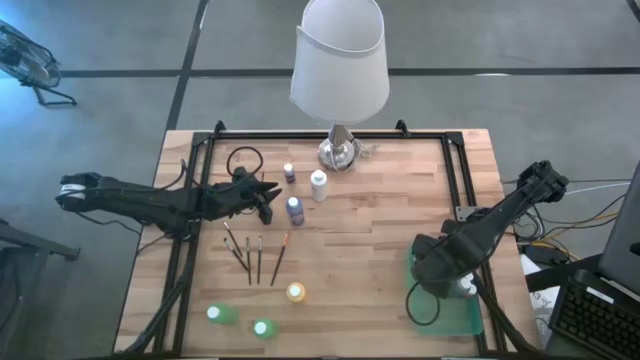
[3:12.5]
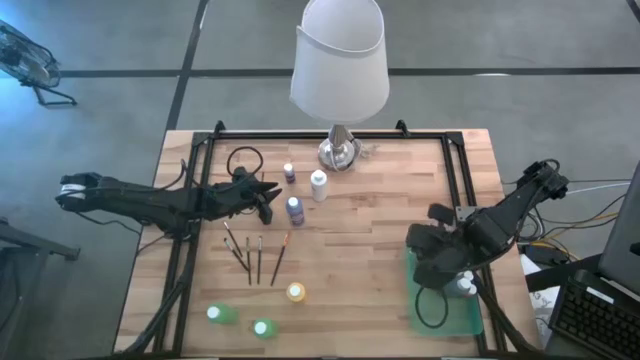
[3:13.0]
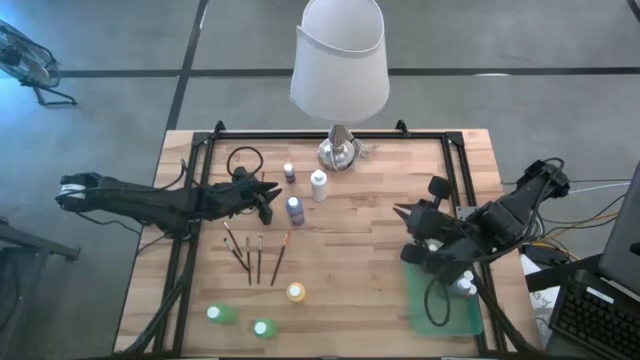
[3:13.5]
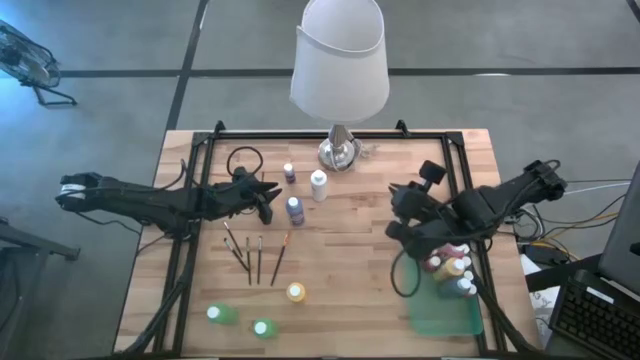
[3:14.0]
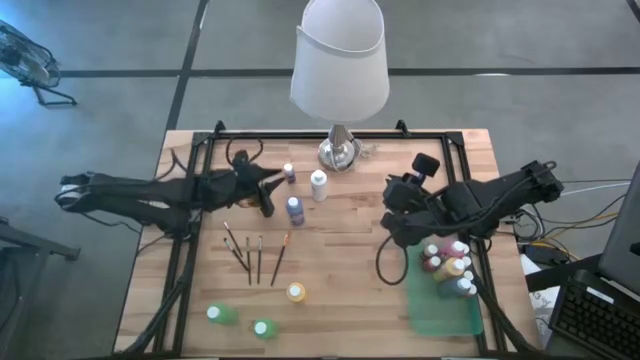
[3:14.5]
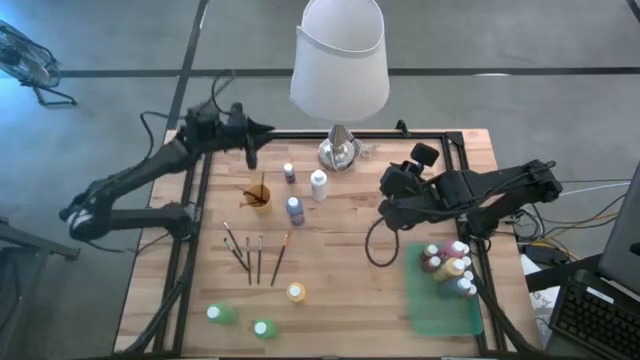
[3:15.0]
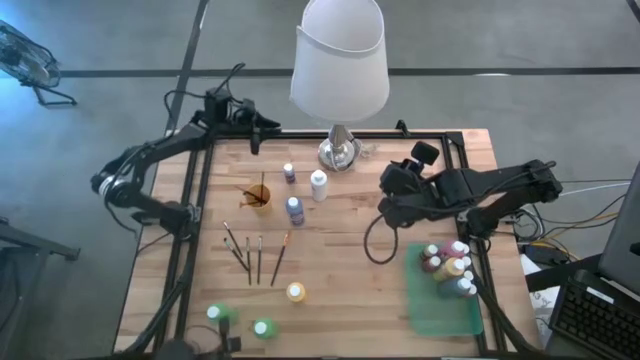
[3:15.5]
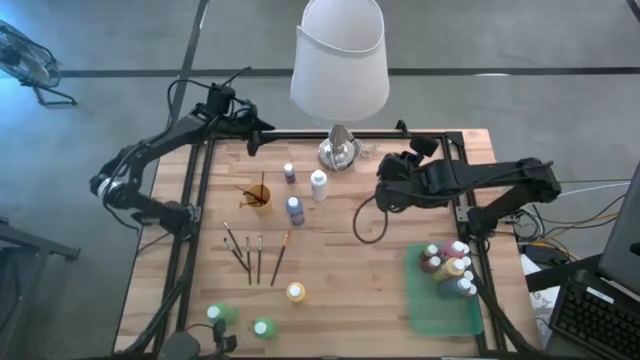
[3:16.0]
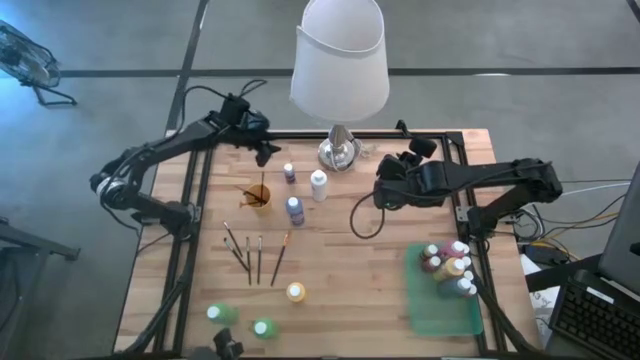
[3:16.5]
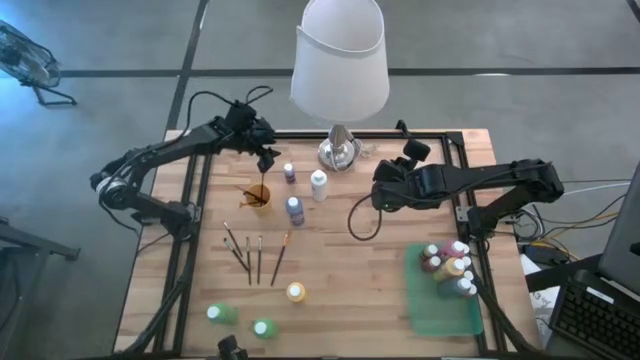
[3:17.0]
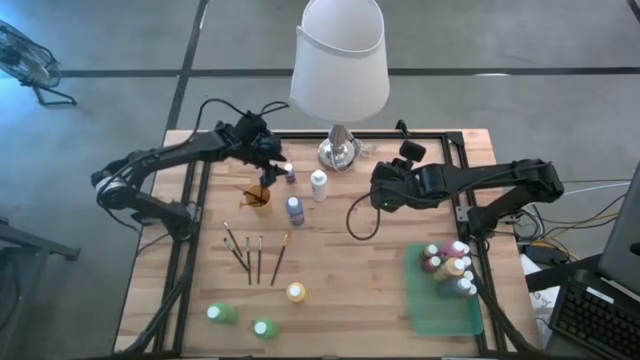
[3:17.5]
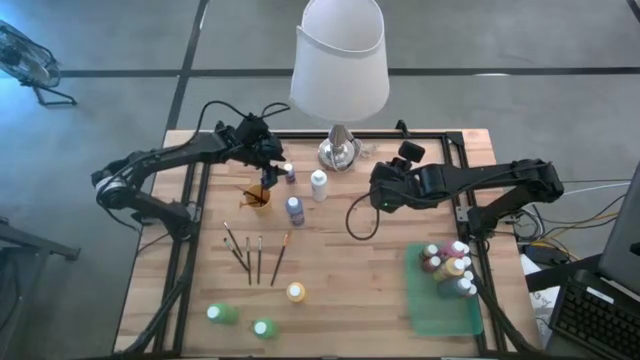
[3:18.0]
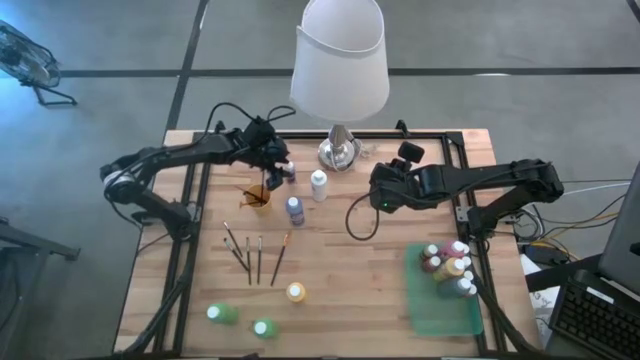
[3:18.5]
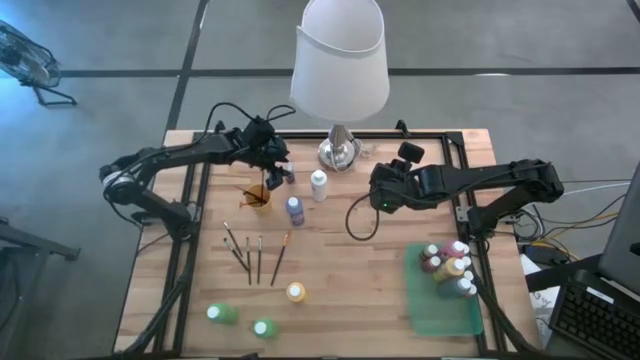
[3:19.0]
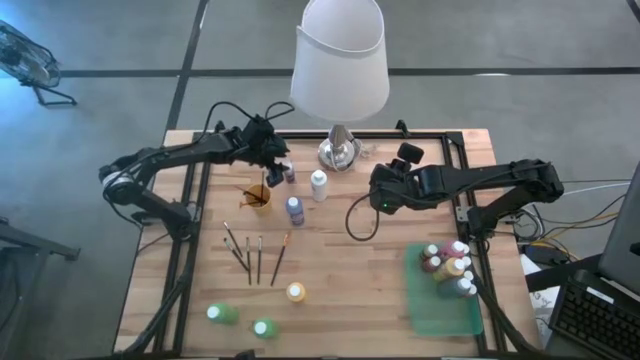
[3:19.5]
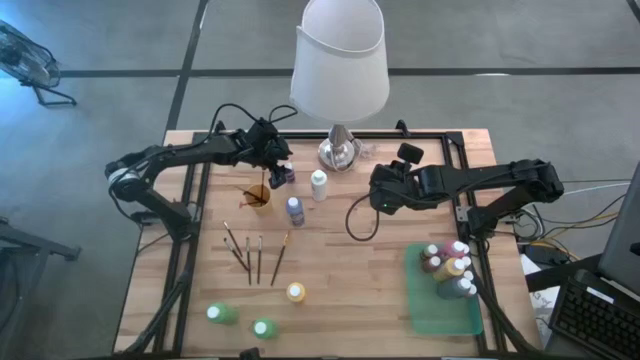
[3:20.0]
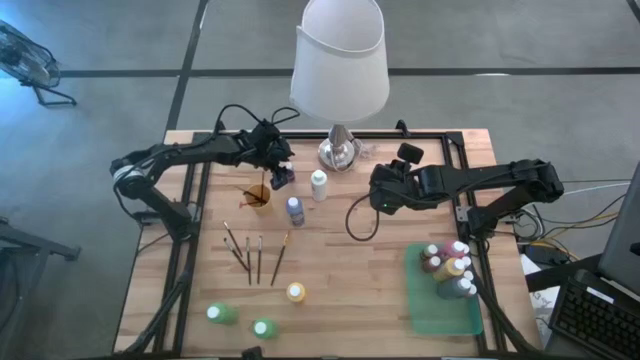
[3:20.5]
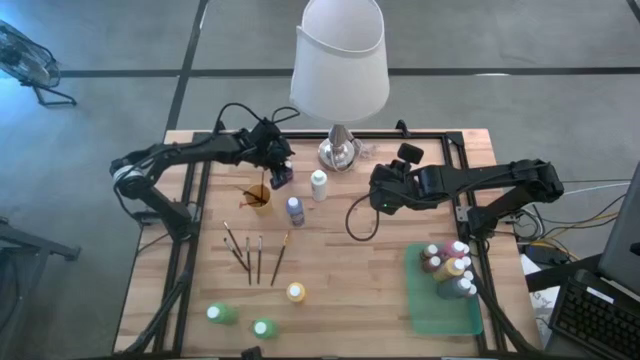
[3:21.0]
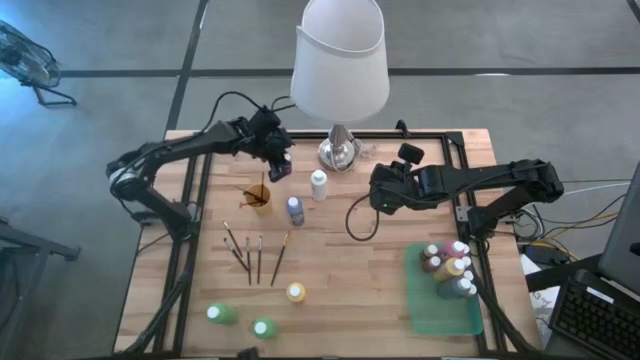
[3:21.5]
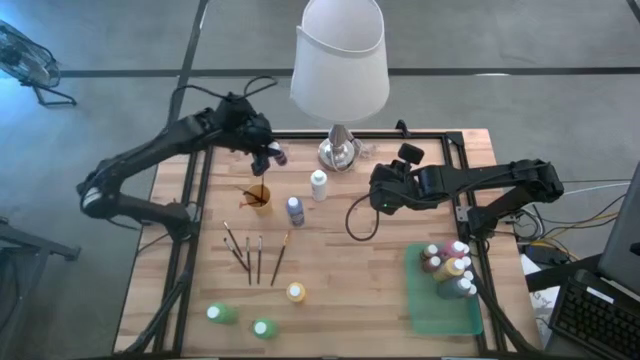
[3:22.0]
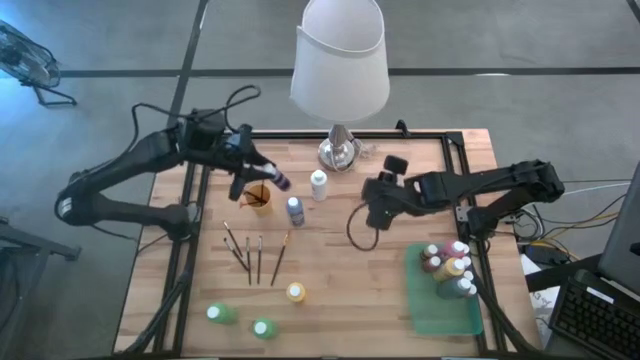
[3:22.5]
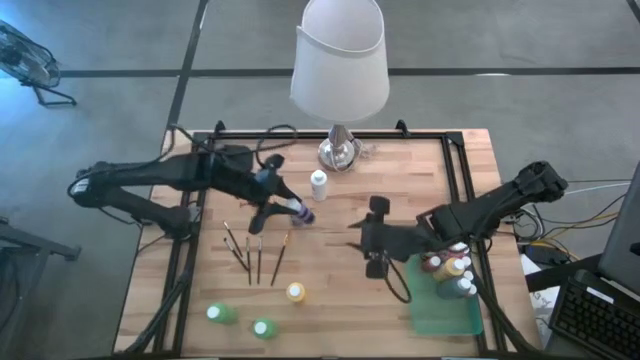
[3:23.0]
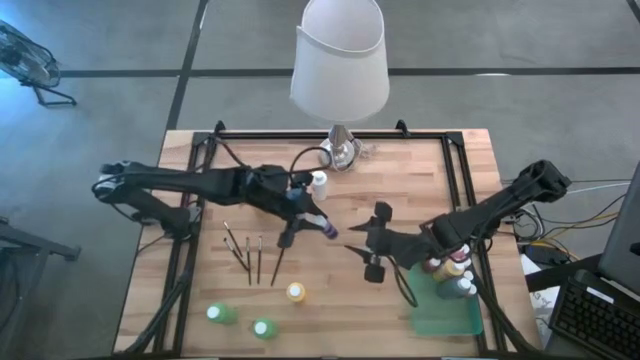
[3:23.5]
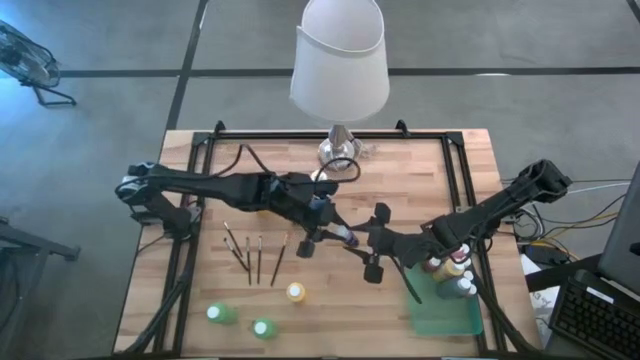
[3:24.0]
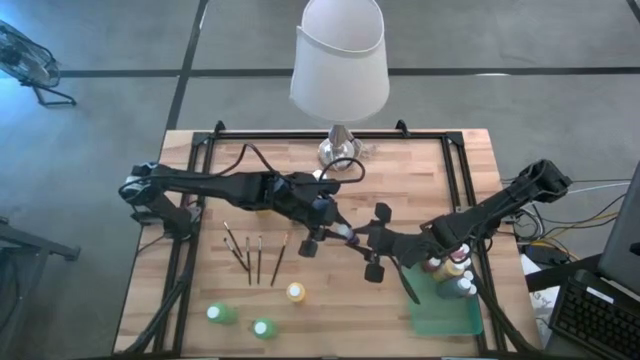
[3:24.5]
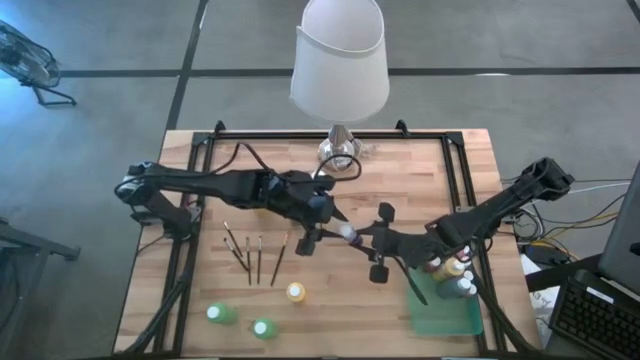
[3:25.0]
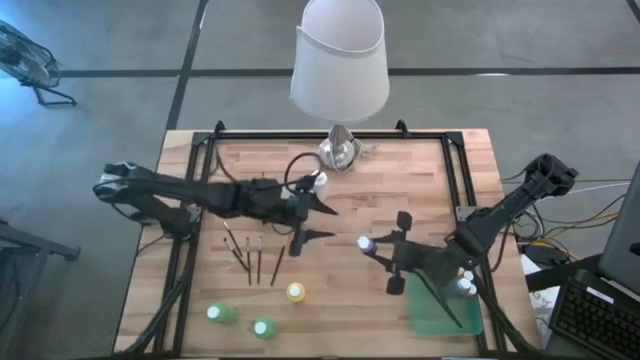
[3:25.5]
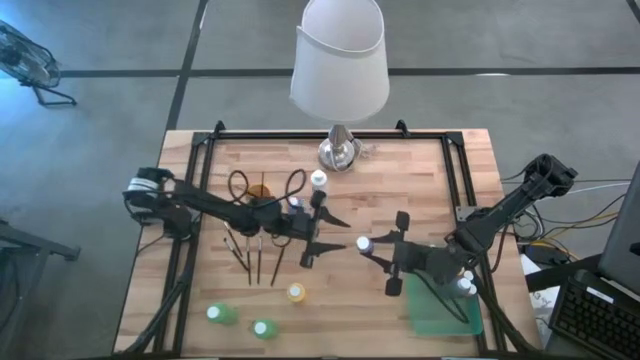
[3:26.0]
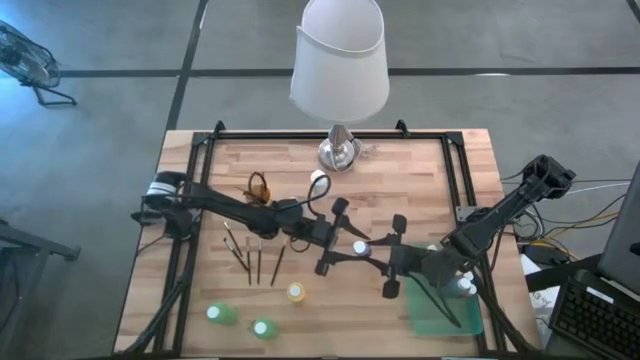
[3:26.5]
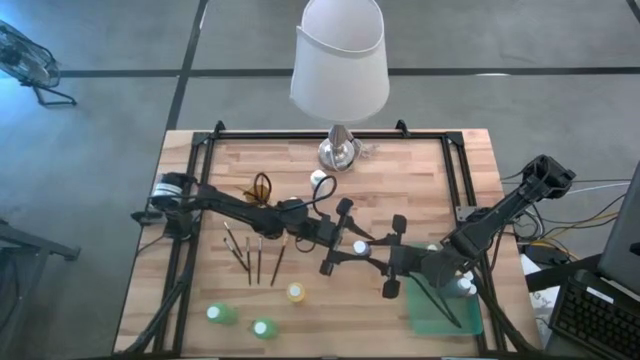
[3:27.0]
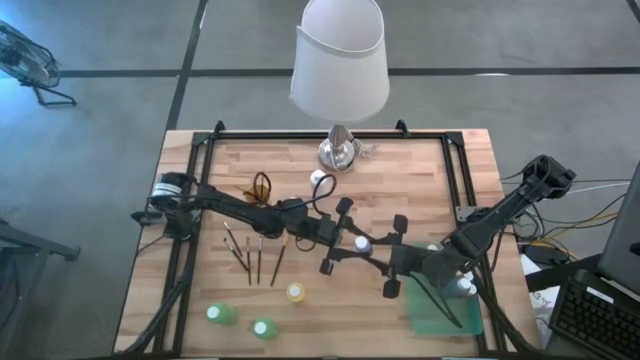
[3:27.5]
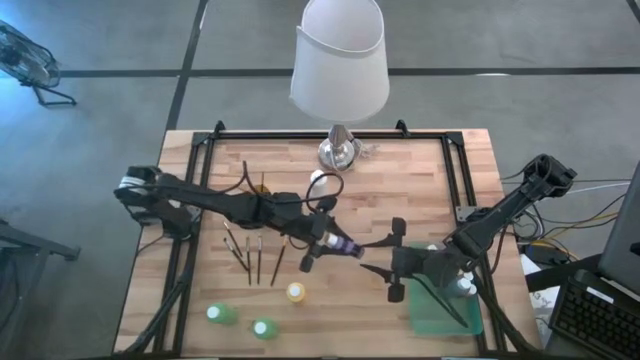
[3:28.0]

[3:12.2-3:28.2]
Task: Pick & Place Paint Supplies
Put the purple paint bottle into the green bin
